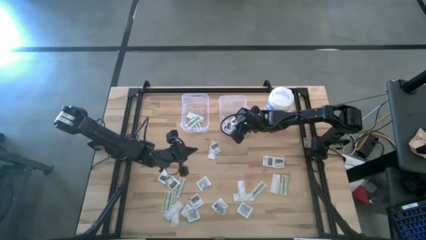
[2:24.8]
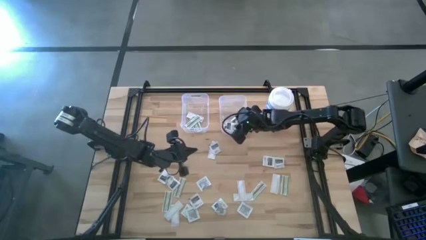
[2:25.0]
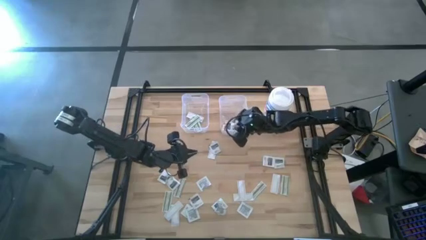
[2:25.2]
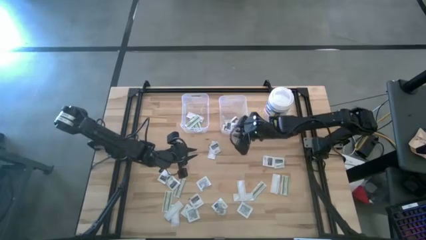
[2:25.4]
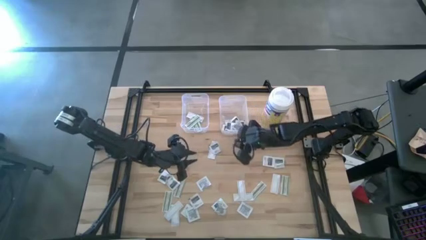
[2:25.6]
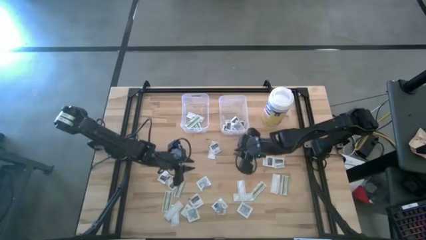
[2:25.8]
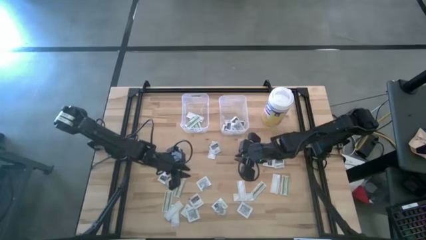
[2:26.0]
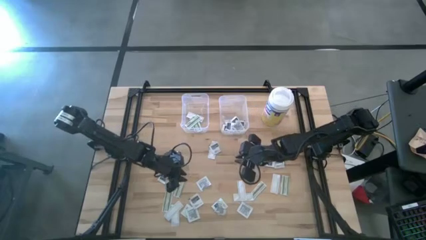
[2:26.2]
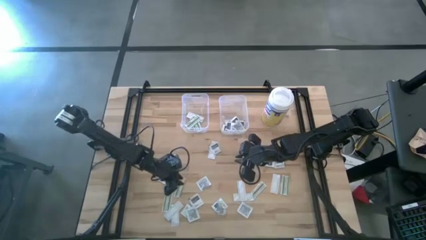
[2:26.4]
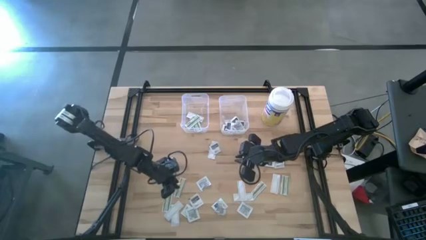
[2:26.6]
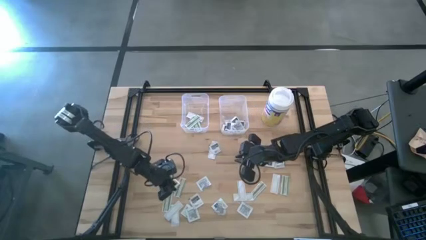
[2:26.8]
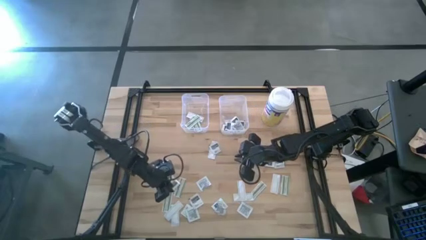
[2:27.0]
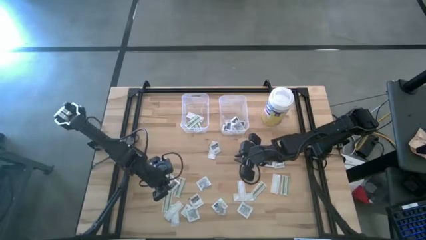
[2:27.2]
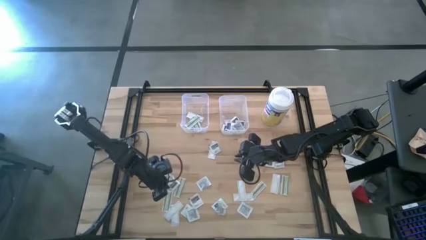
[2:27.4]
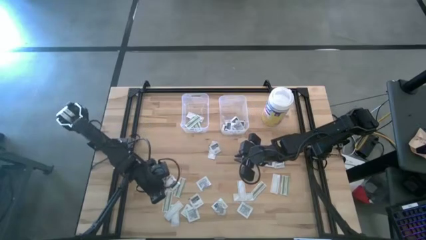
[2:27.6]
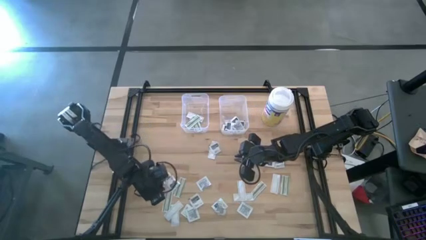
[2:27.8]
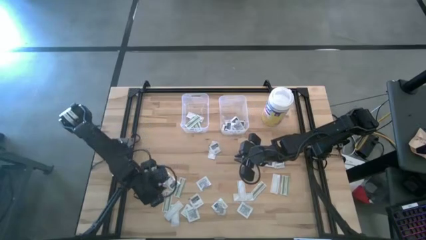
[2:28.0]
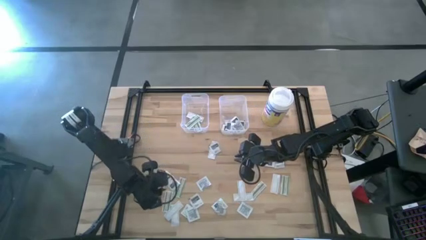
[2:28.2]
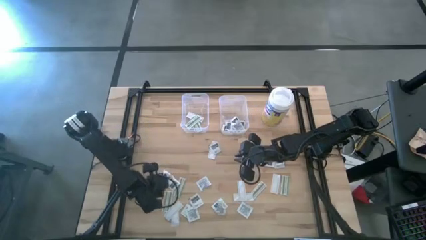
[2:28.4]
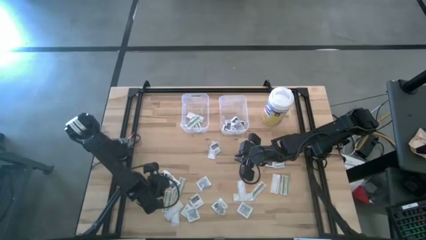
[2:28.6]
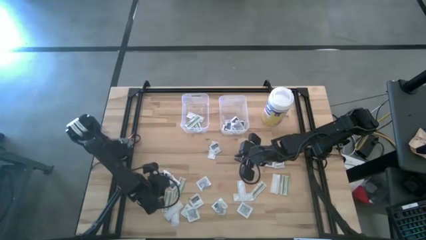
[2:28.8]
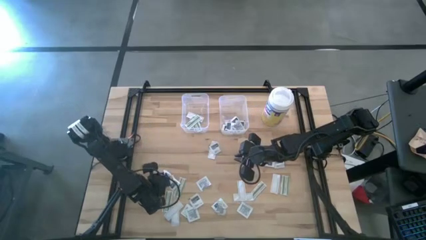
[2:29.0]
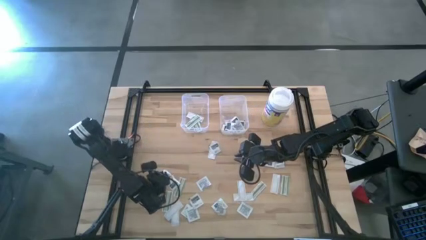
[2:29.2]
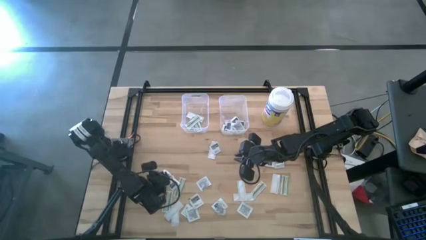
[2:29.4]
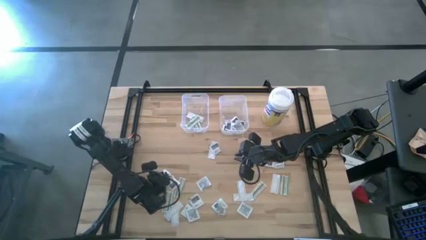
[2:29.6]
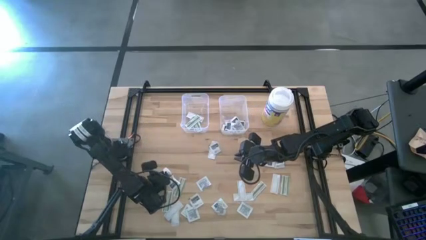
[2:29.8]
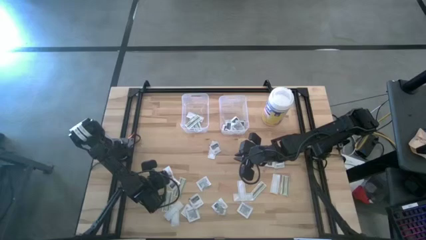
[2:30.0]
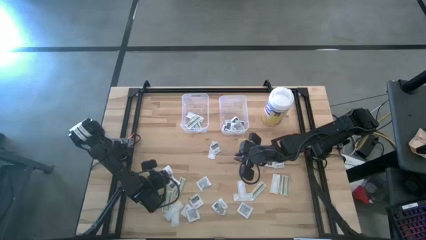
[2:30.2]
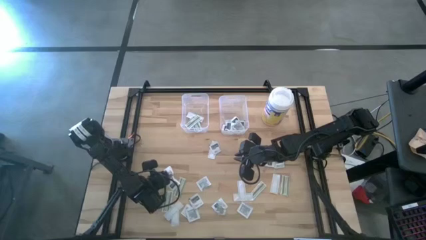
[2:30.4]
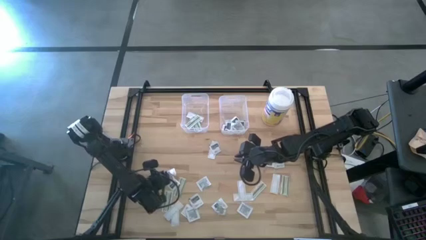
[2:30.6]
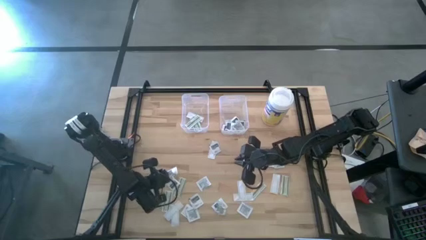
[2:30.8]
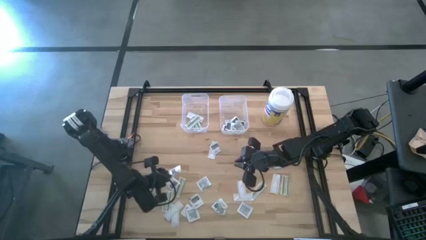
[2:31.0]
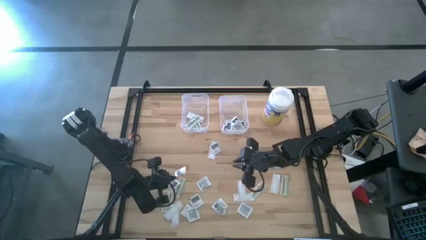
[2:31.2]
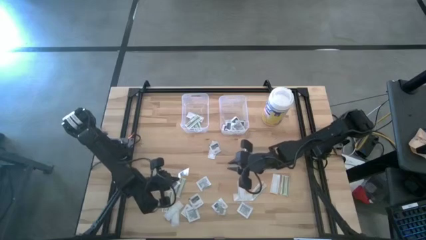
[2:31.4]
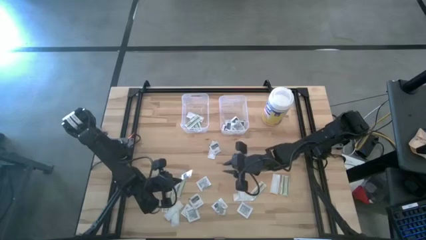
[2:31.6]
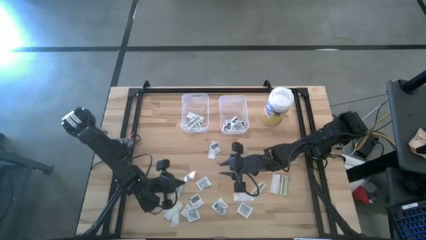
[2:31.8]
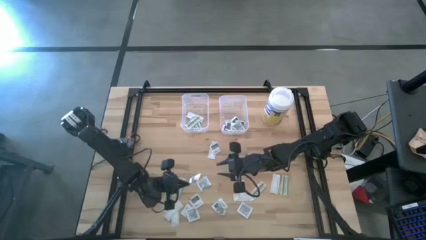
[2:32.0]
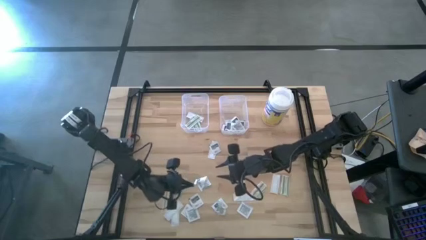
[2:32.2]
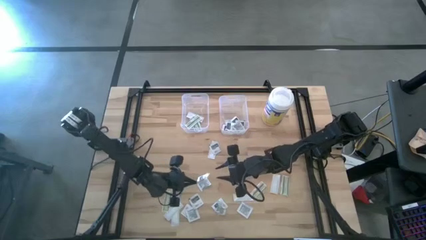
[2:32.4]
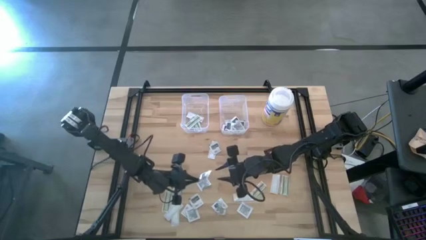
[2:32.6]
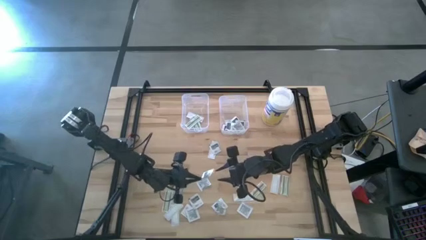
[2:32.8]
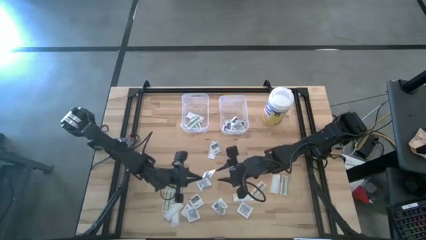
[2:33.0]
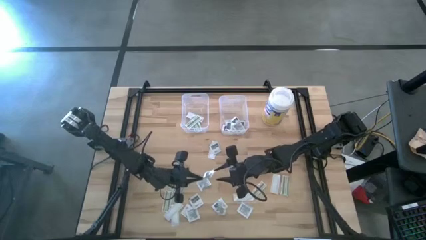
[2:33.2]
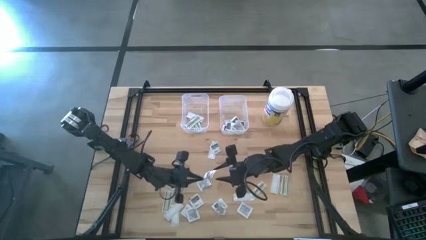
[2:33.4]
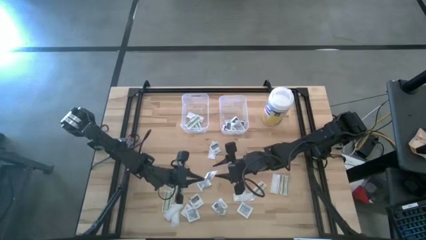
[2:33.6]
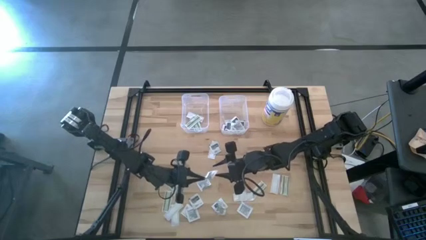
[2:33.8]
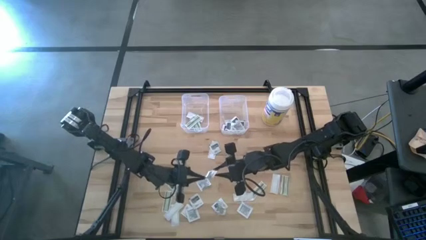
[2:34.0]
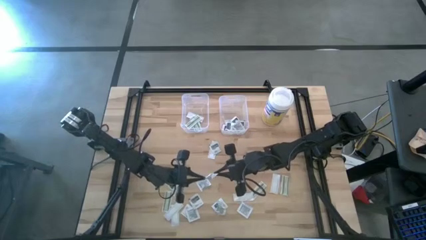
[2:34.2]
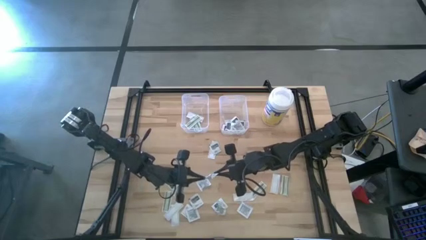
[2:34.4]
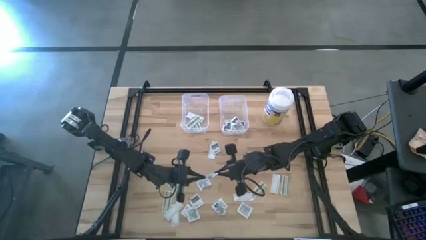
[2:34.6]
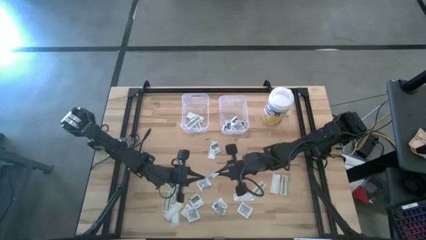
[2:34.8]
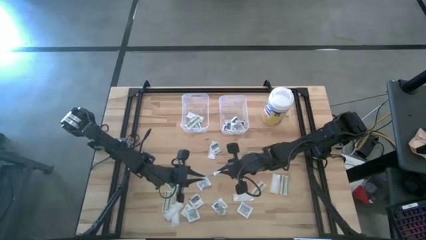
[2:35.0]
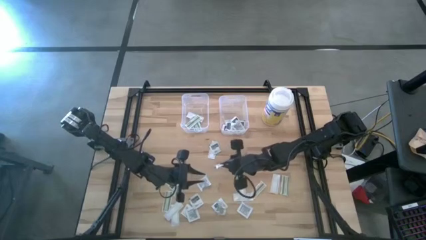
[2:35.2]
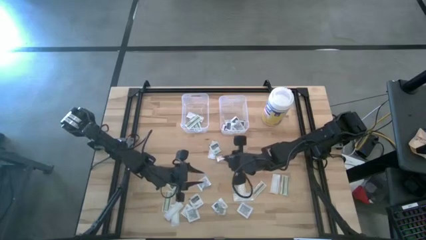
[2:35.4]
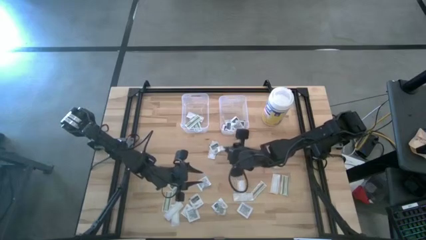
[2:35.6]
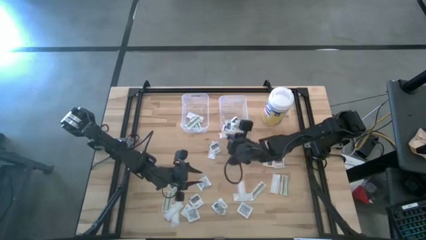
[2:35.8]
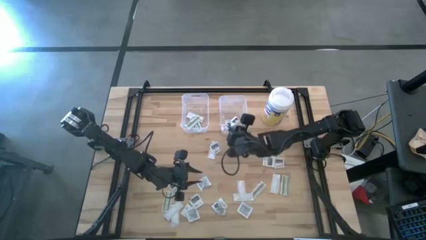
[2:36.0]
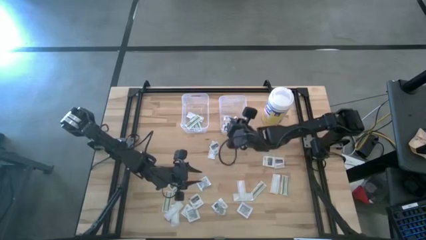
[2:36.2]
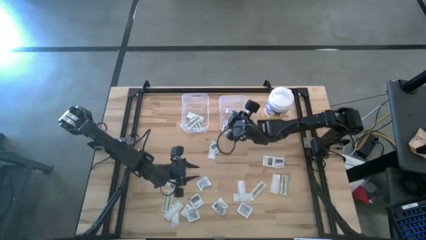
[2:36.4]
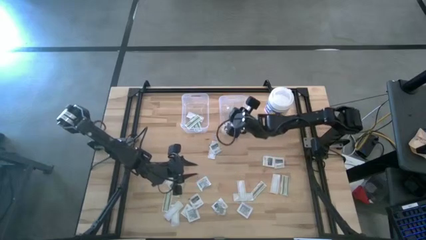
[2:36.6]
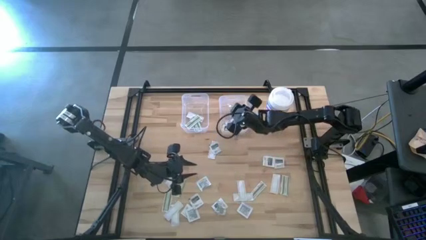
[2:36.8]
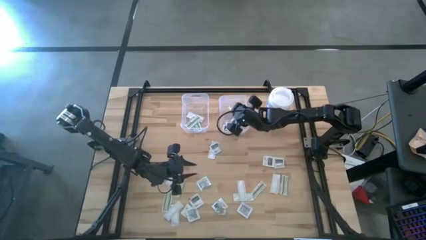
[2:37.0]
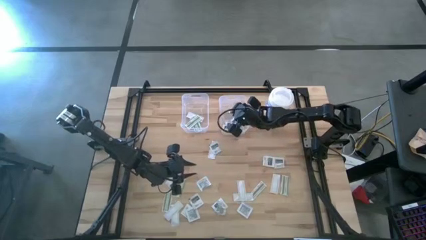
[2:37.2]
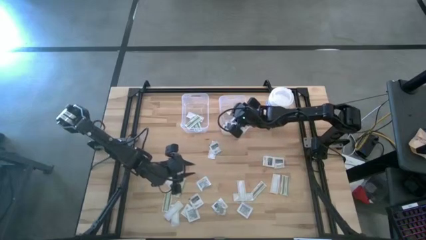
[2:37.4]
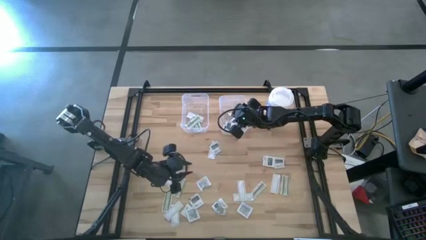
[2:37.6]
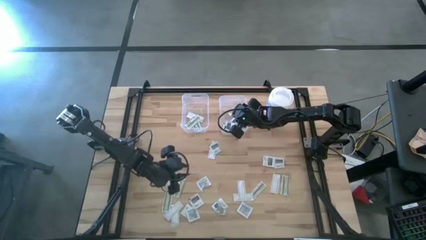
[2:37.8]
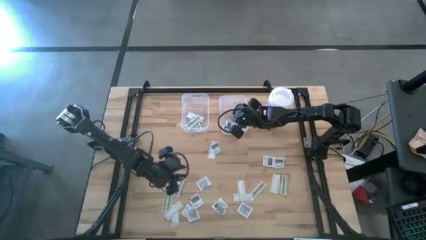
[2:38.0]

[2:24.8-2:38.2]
Task: Pick & Place First Aid Supplies
Put the gray towelette pack into the right transparent bin
